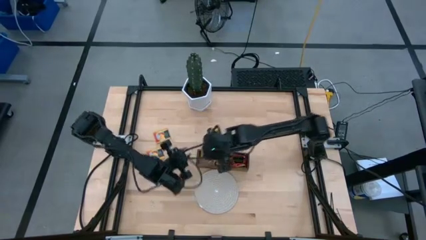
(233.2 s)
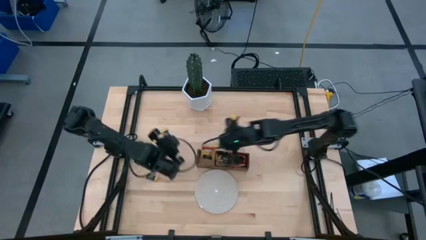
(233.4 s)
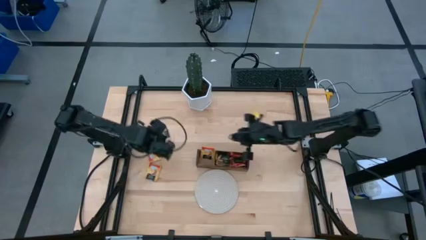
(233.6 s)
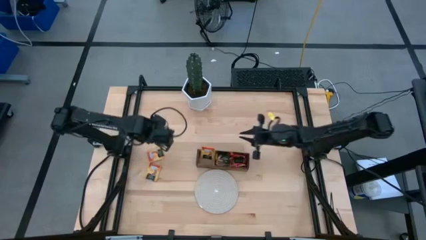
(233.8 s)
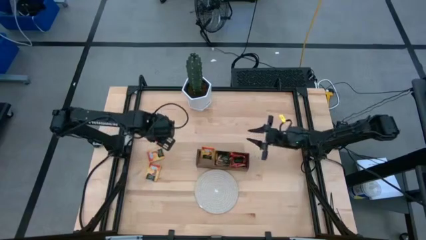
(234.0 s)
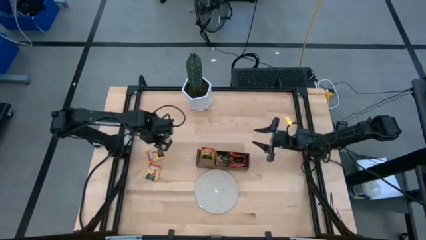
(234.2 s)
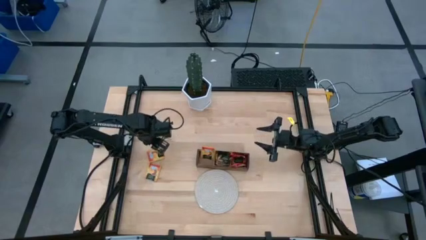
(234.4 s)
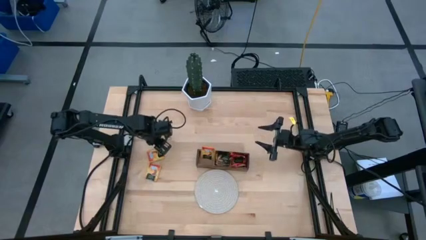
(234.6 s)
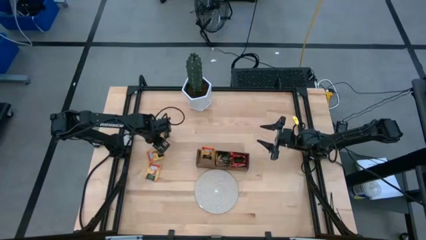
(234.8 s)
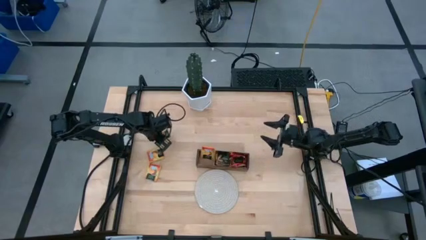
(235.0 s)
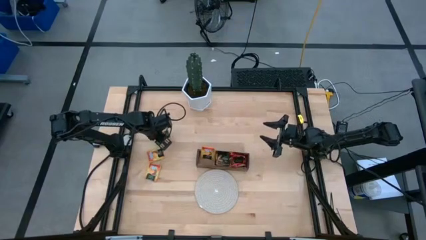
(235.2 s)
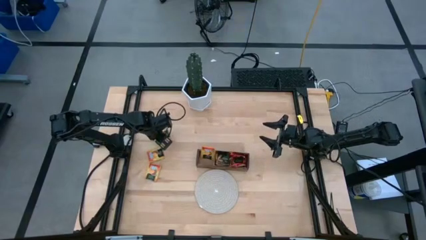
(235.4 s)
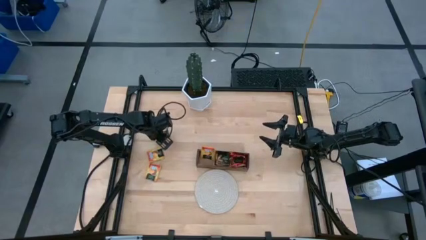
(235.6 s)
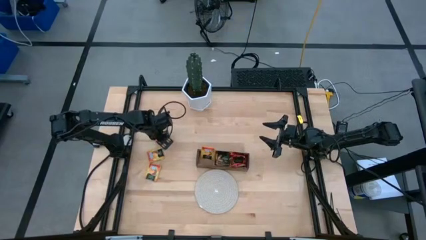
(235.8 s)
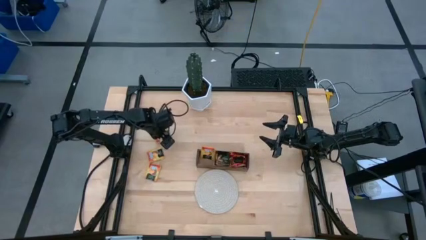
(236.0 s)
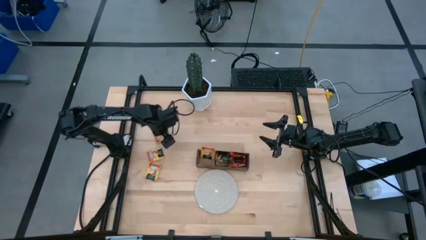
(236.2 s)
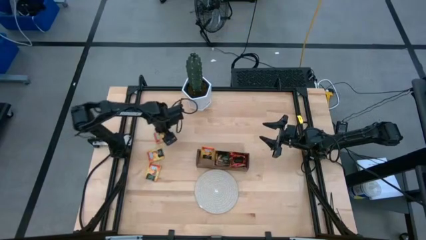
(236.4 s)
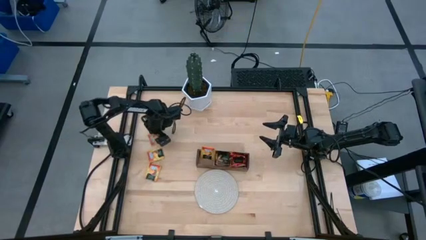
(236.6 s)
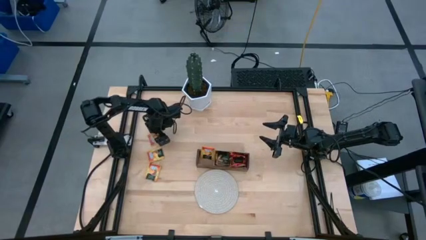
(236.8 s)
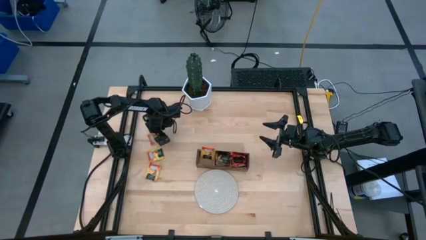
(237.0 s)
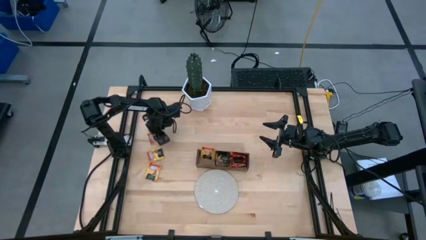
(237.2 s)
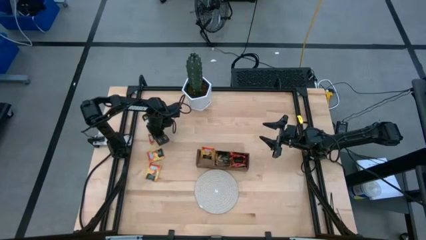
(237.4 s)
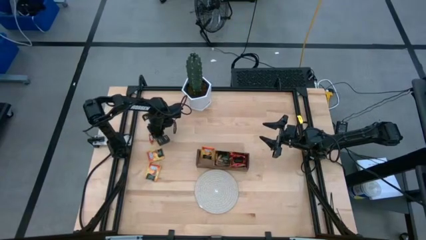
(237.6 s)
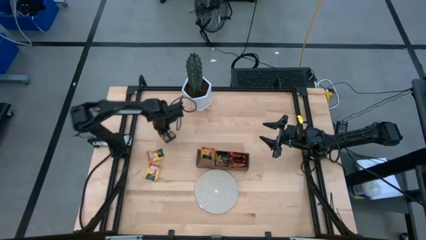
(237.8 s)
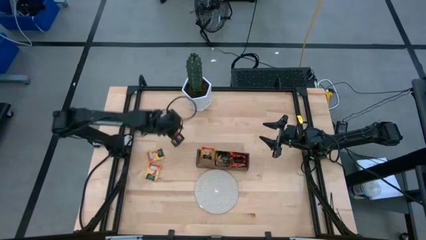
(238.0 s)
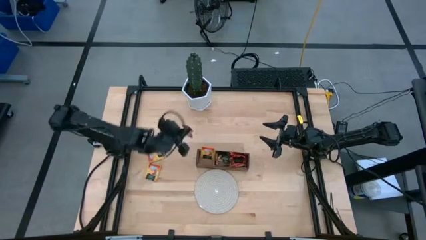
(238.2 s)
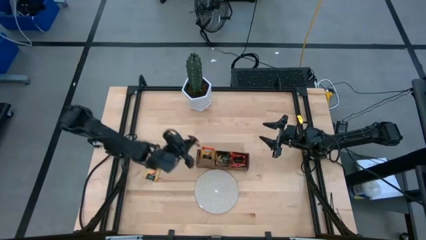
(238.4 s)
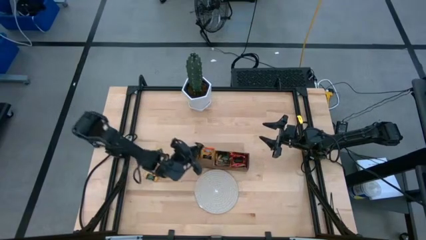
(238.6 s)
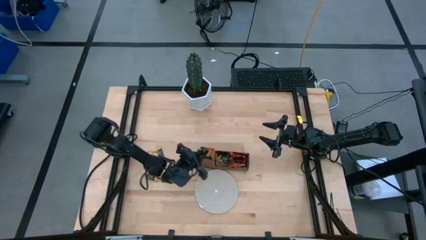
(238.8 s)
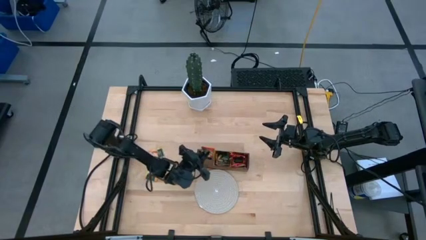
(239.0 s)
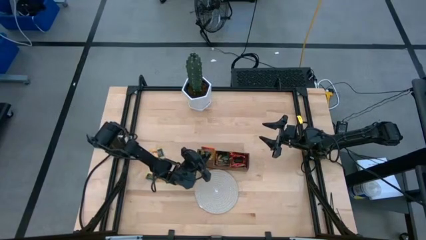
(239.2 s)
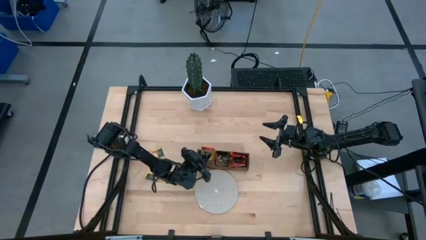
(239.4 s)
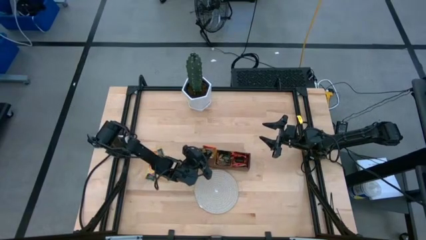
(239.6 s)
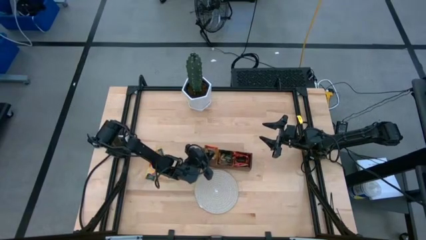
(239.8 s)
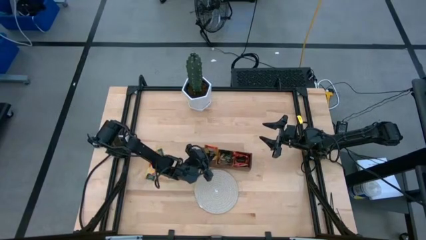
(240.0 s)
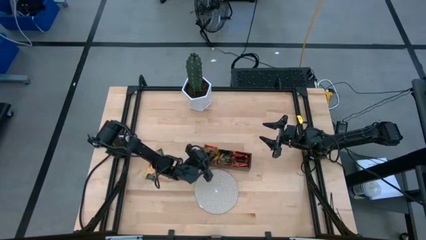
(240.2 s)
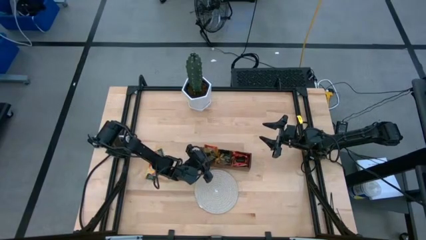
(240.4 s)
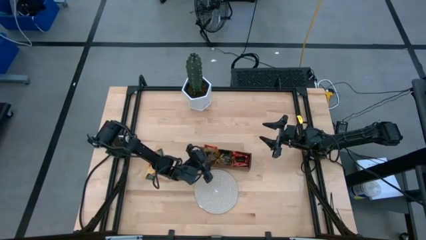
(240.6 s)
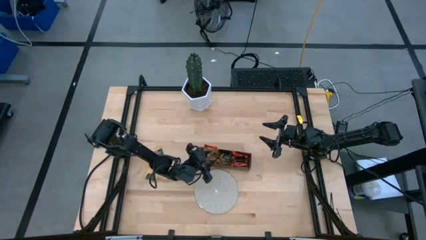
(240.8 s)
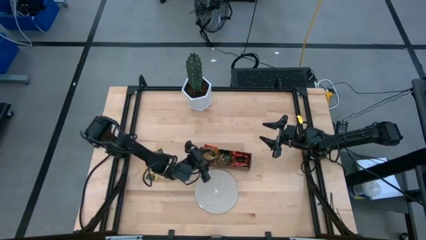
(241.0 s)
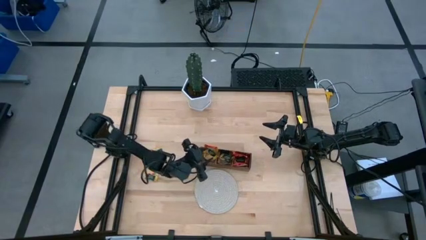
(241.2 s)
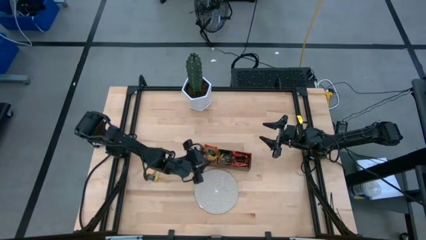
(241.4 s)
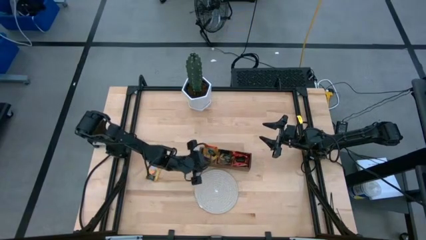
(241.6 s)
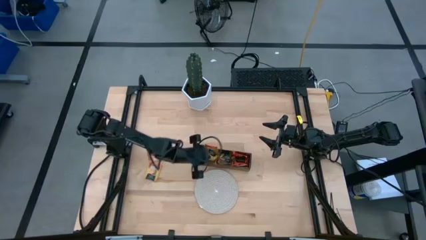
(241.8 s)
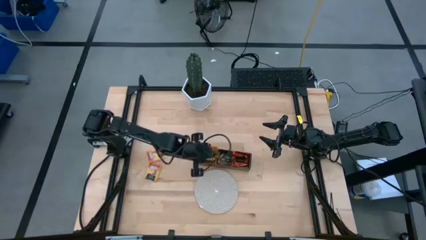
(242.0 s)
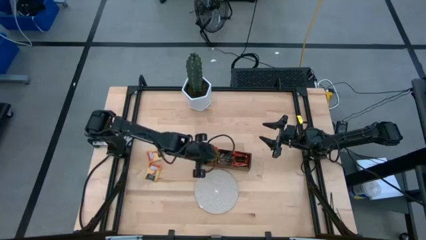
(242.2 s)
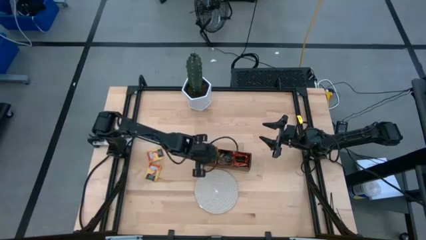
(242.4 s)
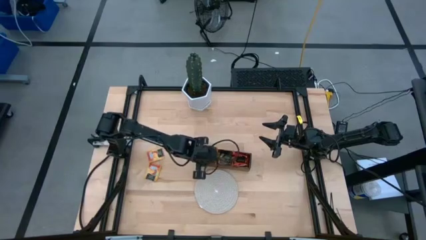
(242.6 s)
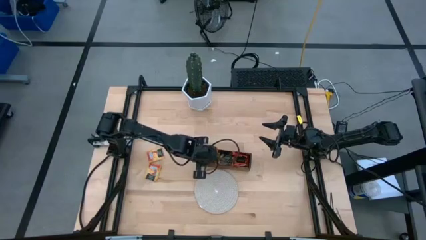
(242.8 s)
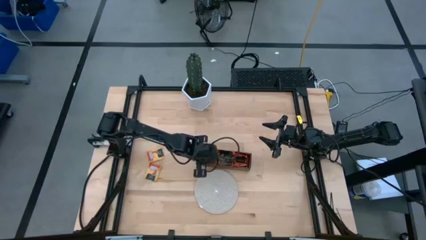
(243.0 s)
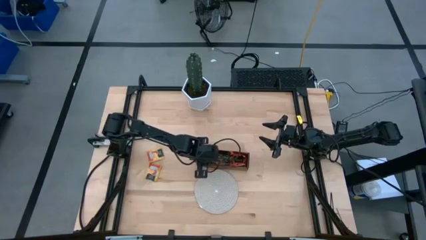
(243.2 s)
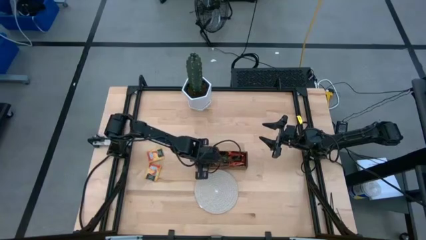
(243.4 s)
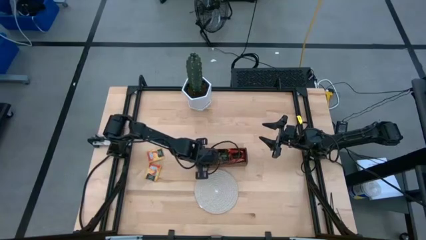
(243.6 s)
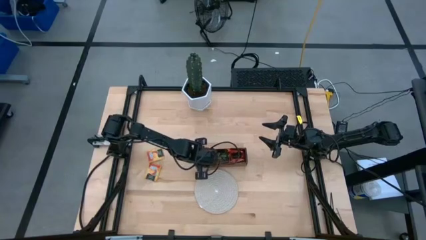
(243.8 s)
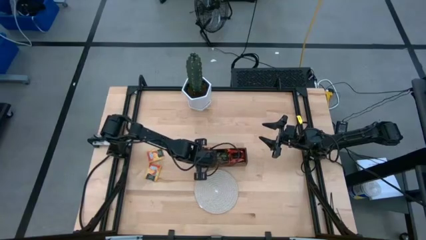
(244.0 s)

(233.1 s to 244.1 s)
Task: Pick & Place Tea
Put the yellow tea bag into the left section of the wooden organizer

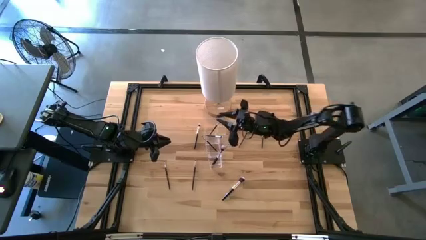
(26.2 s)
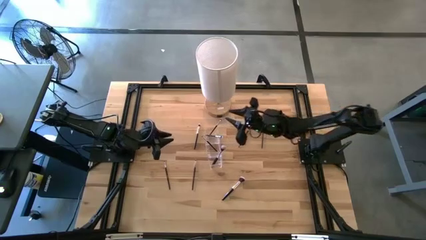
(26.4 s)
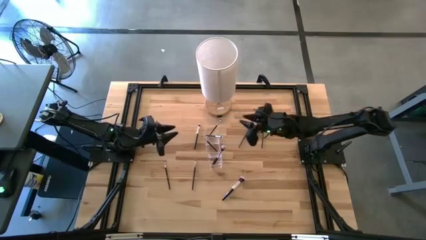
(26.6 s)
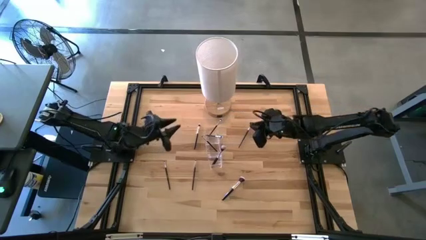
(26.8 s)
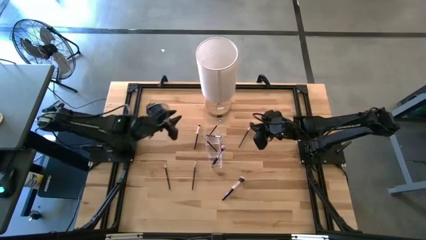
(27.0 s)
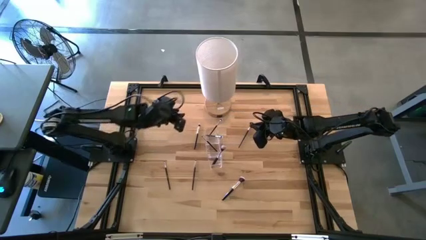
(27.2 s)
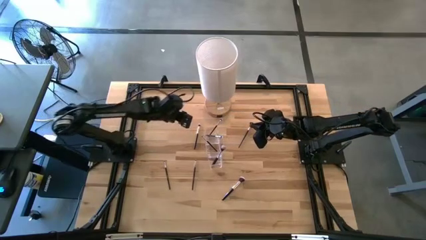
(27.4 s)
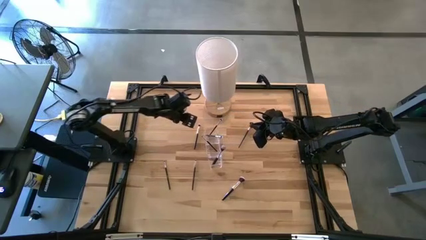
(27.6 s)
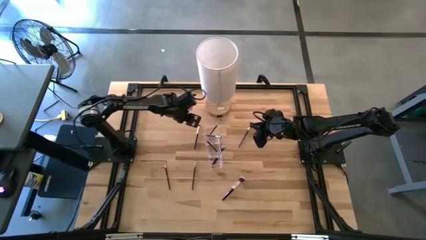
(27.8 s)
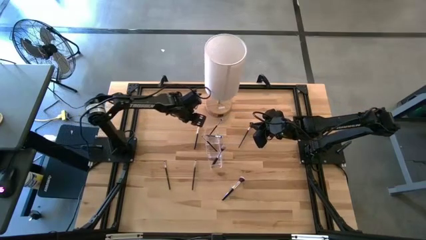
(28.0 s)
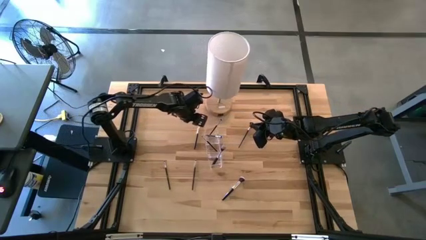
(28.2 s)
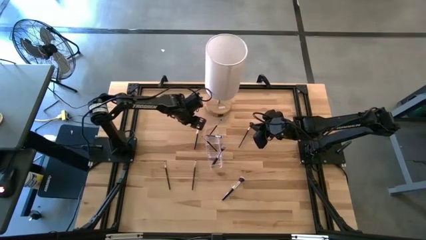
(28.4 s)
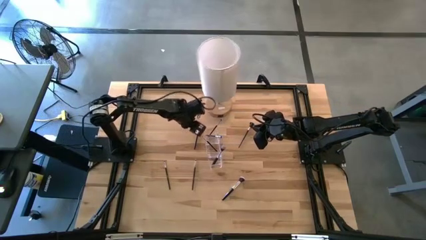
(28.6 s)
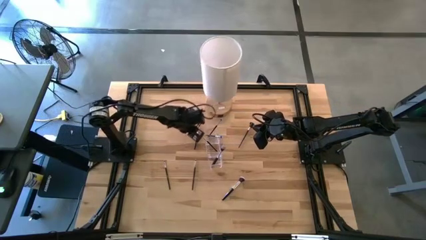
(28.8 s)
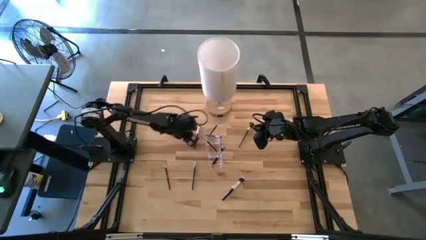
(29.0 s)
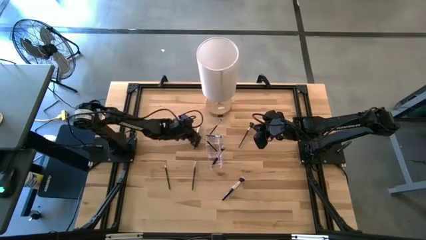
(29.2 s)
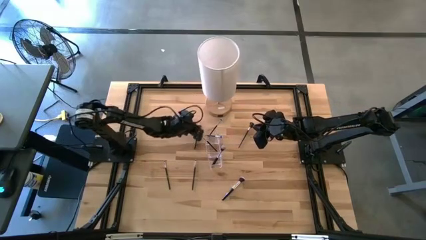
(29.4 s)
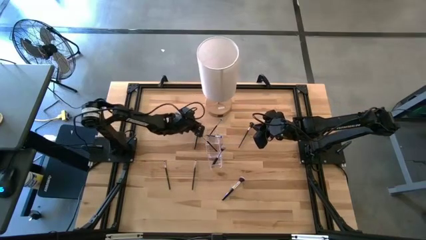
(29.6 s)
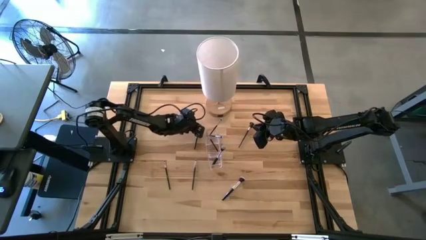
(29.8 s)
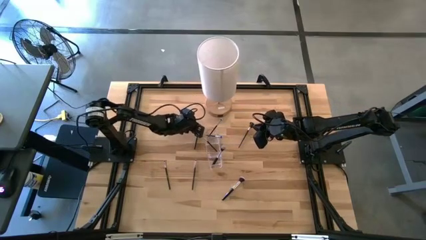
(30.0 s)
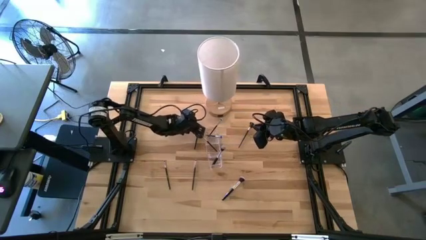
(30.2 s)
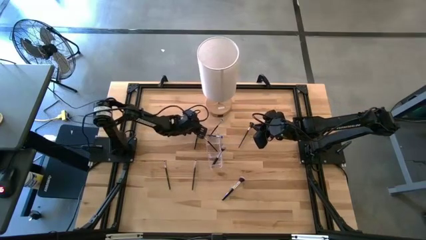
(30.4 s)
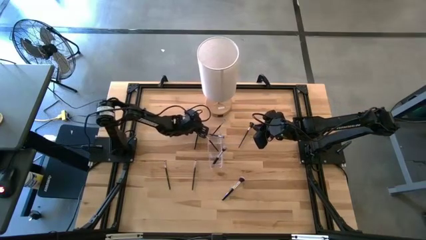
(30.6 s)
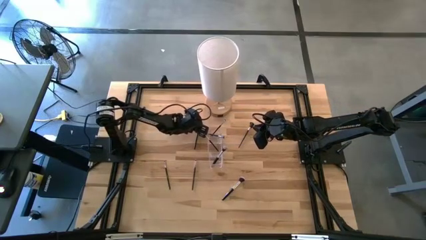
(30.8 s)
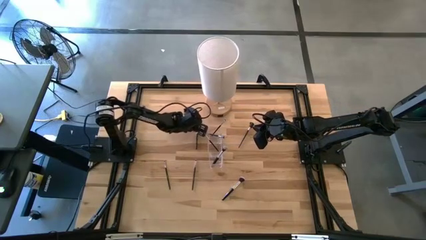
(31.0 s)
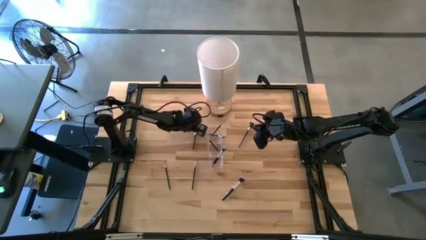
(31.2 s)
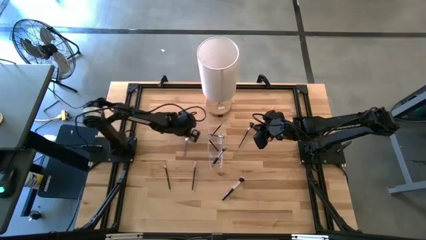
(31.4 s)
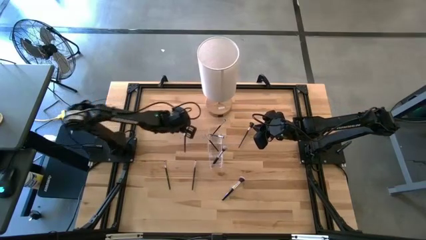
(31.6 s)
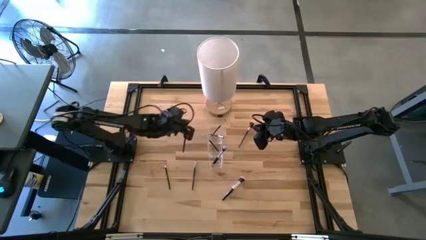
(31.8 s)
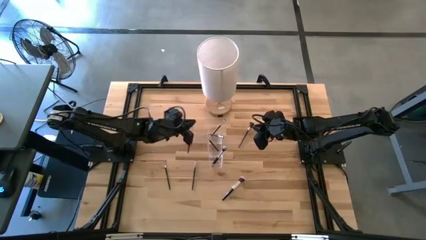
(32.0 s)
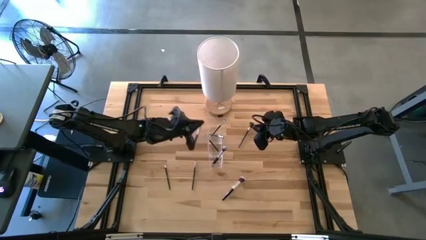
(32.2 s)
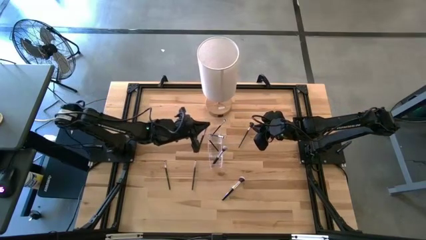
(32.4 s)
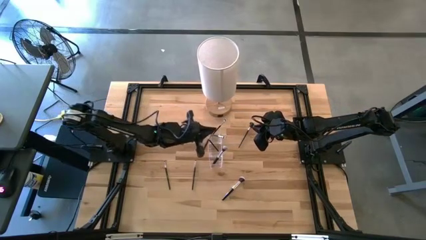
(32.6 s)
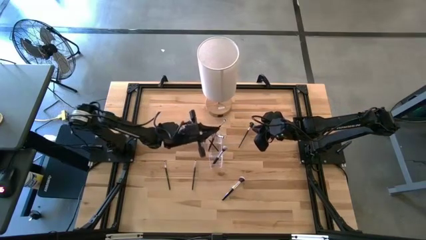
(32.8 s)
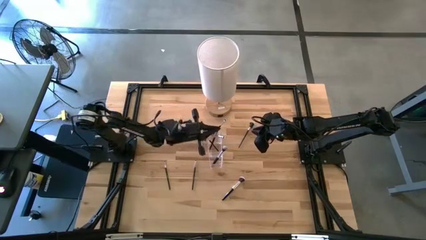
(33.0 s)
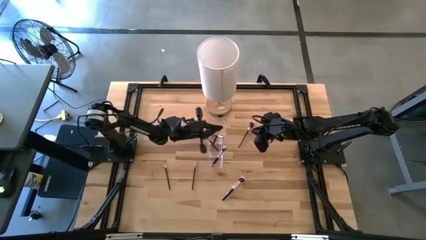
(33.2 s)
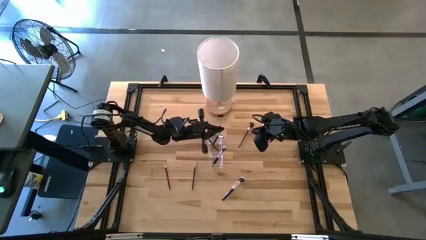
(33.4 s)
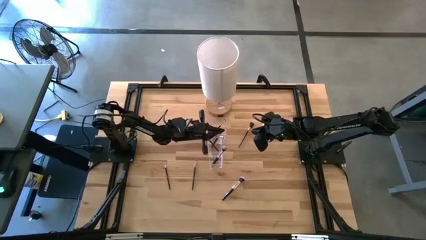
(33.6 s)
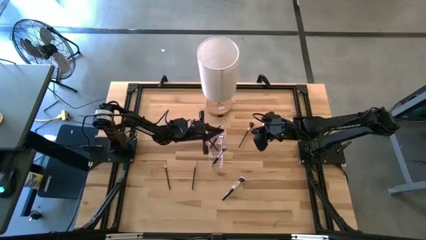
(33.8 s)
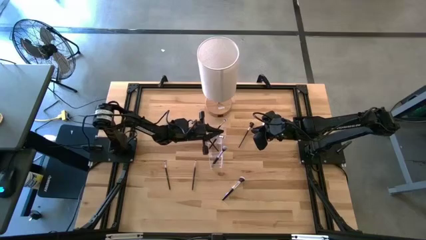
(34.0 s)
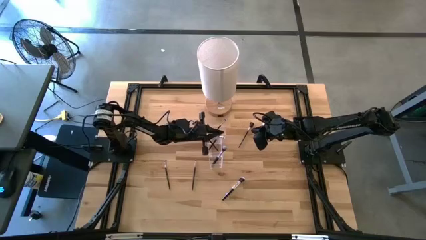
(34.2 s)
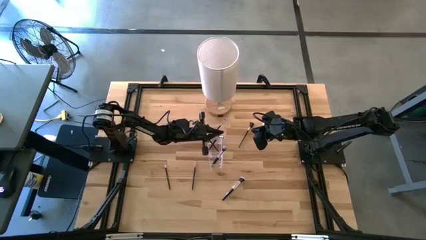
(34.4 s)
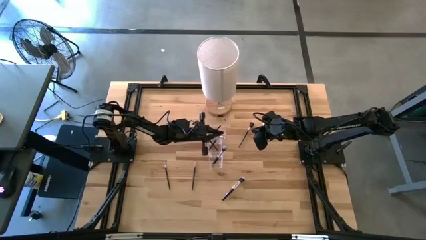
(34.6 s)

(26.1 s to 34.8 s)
Task: Put items in baskets/containers
Put the black eyeshadow brush into the transparent organizer
